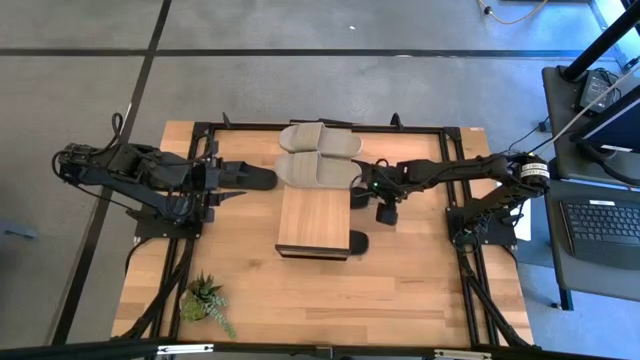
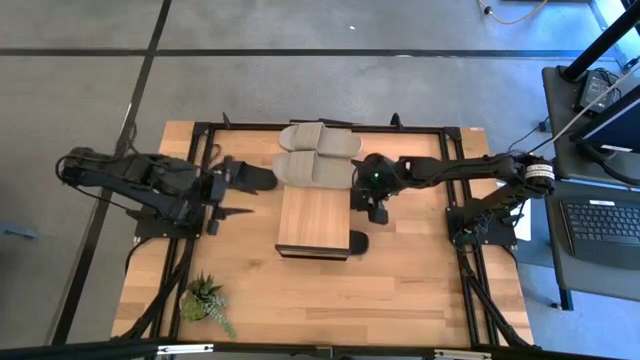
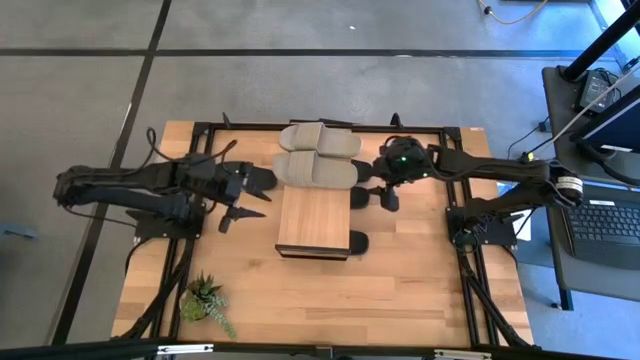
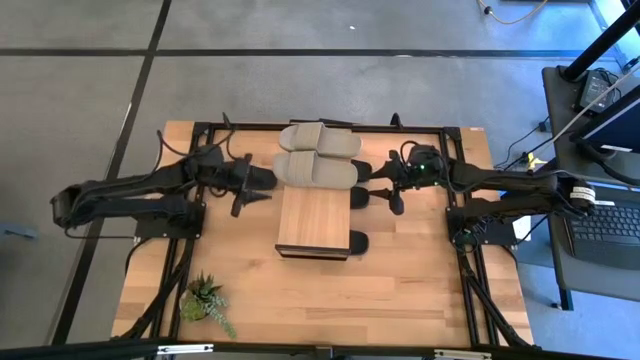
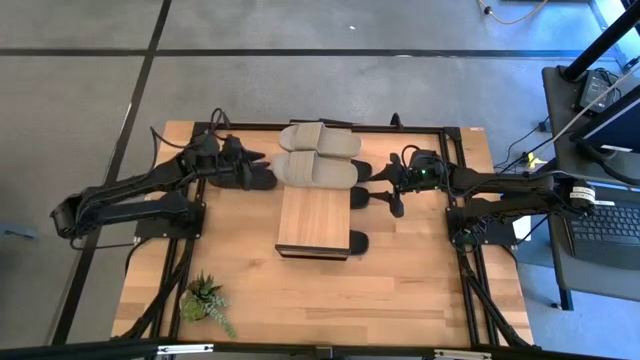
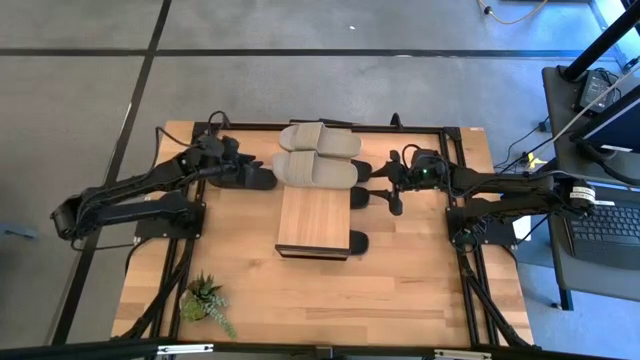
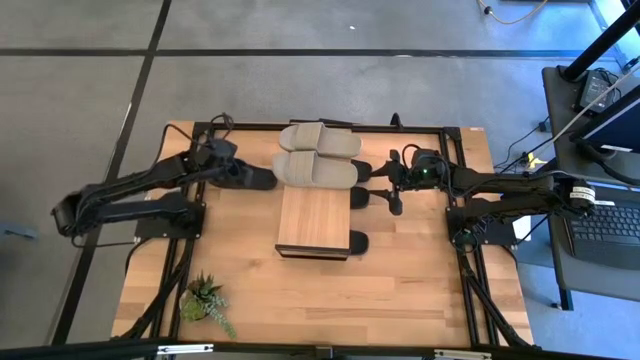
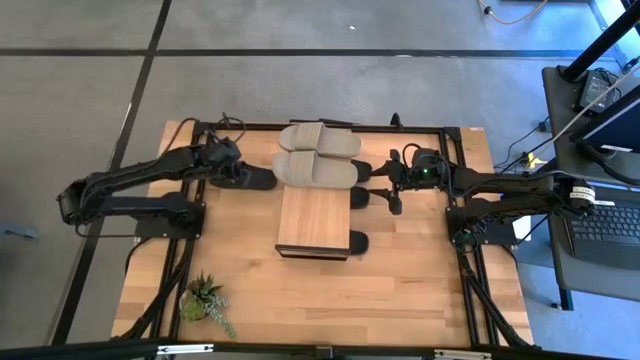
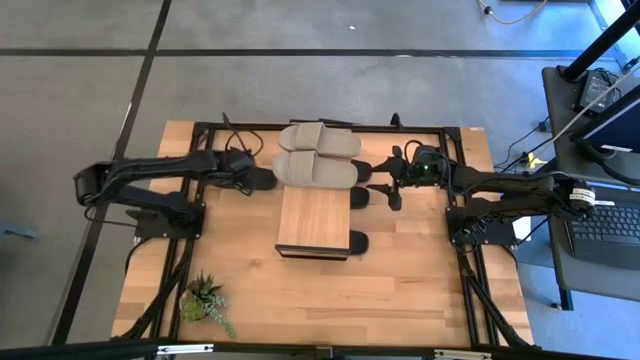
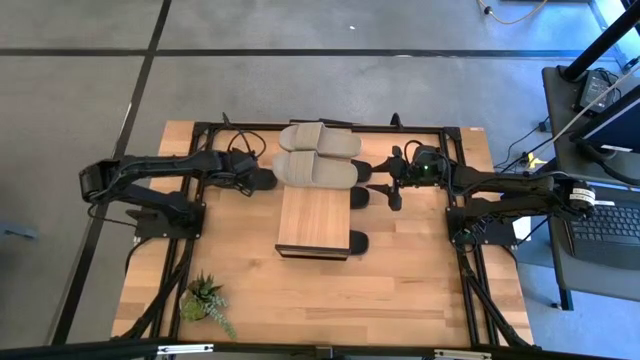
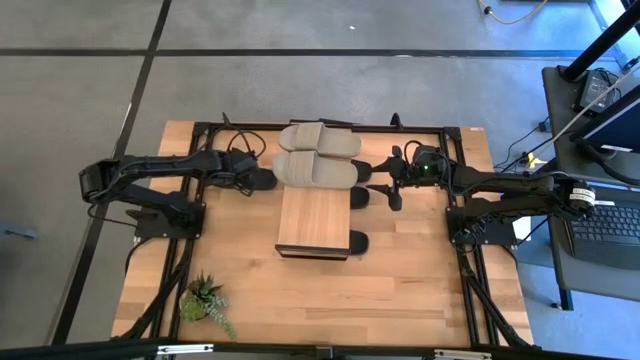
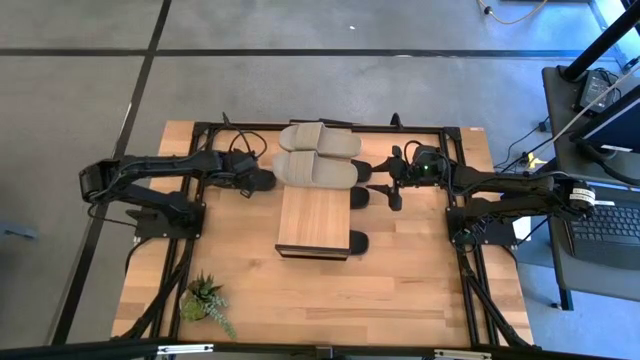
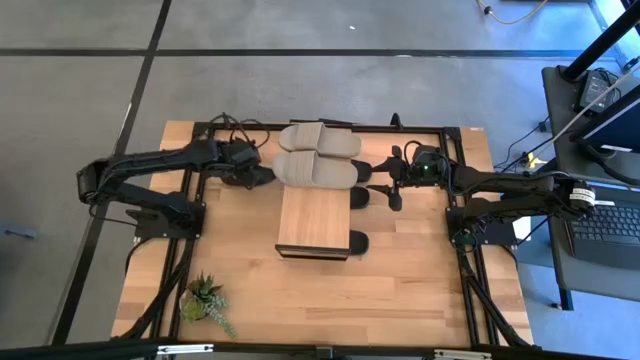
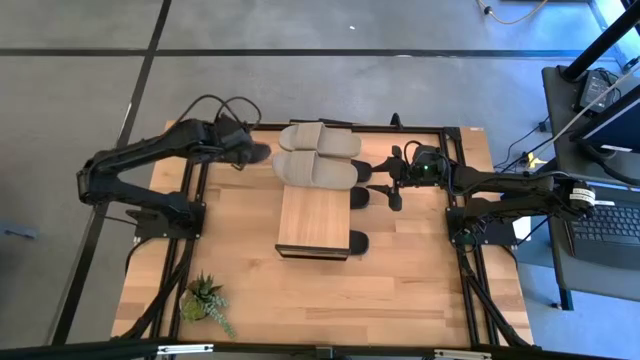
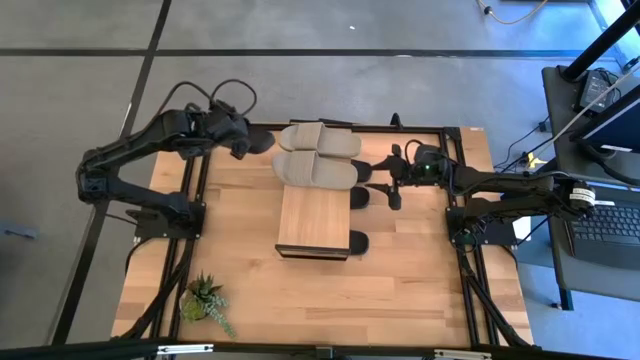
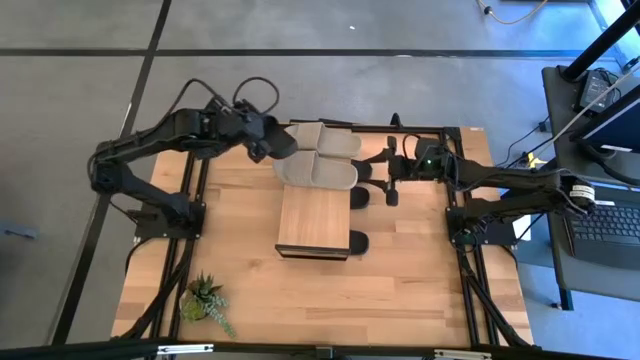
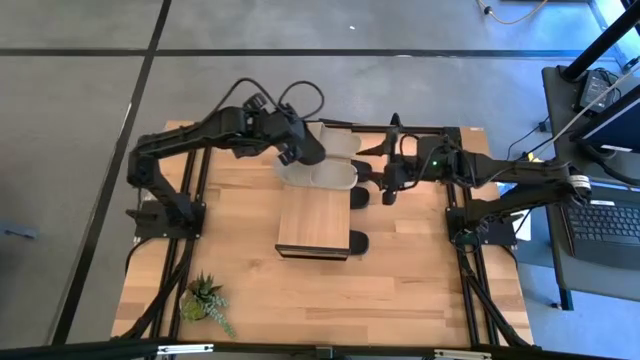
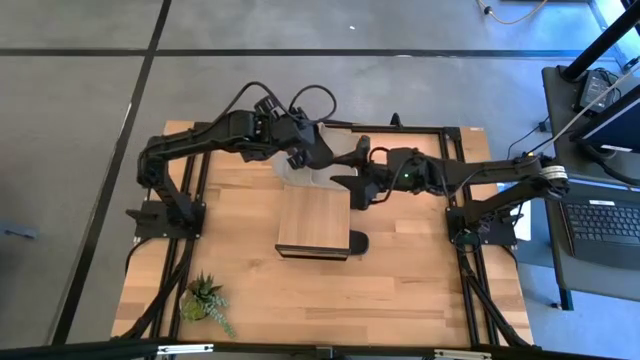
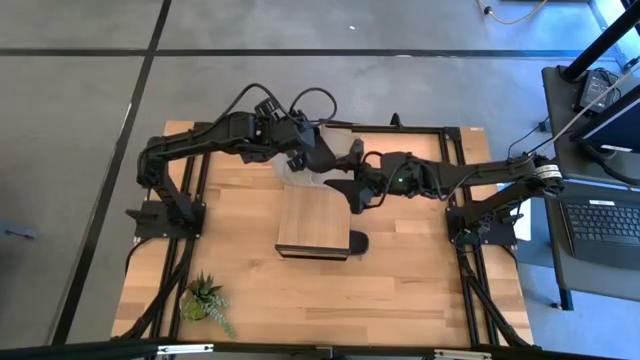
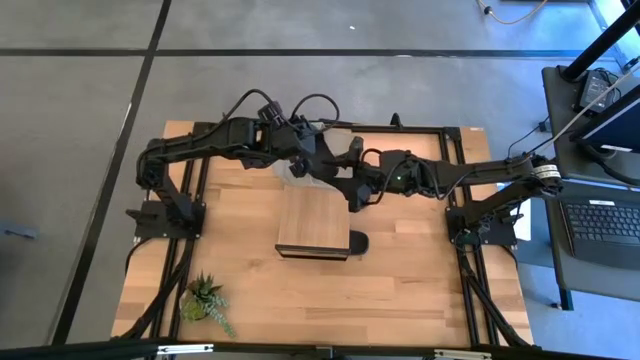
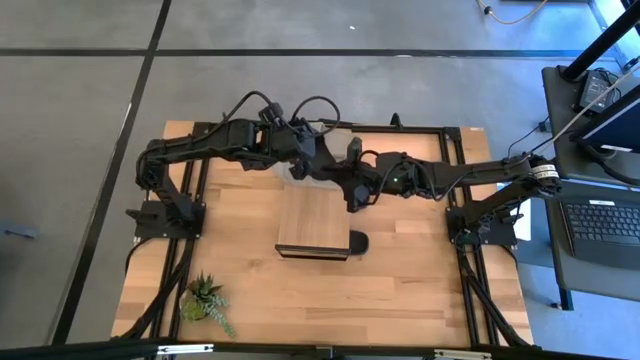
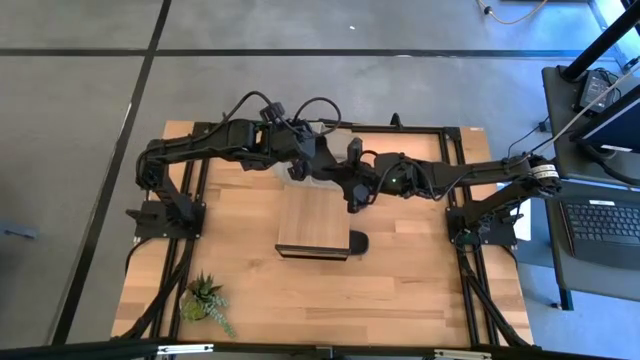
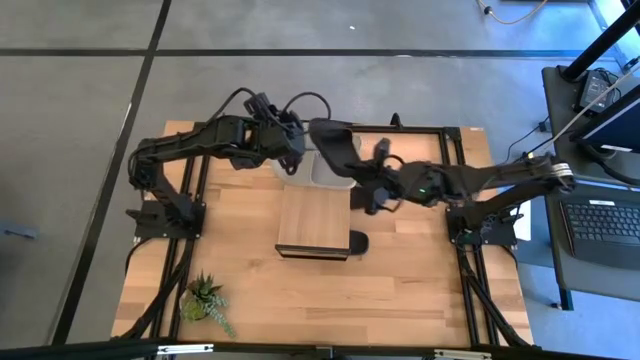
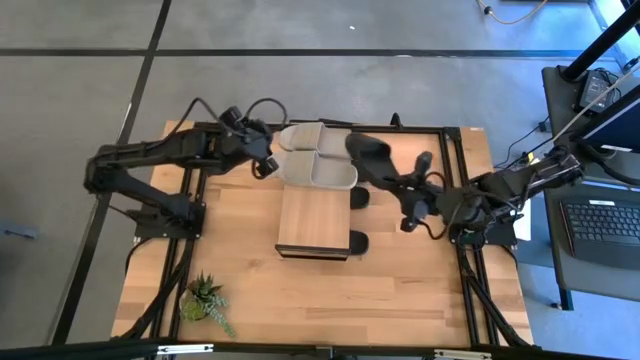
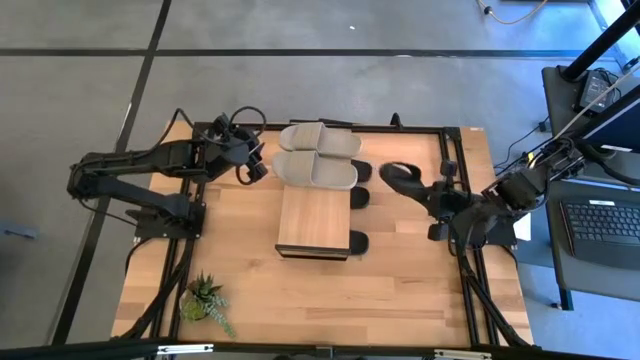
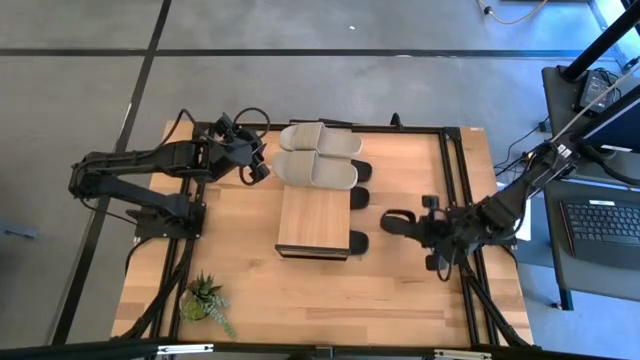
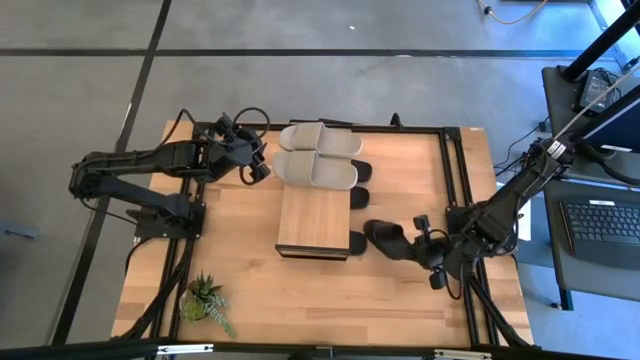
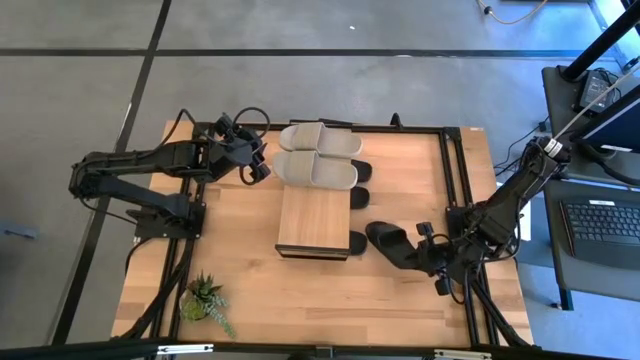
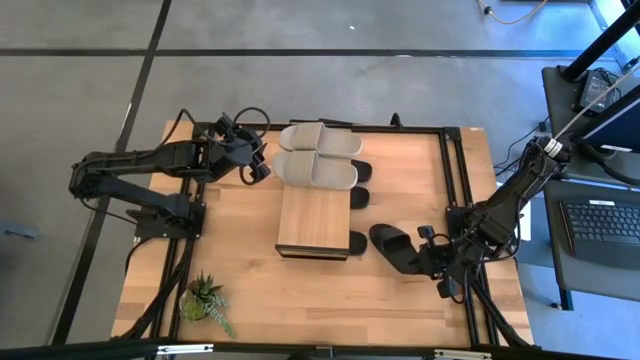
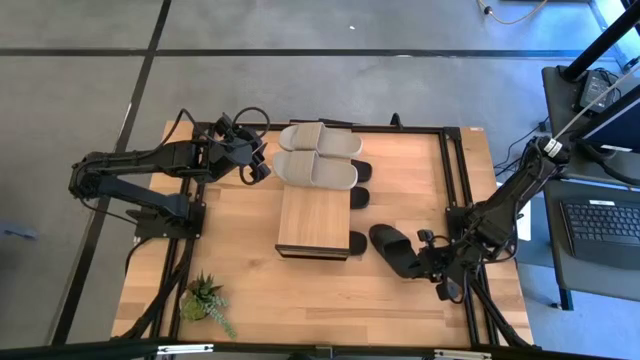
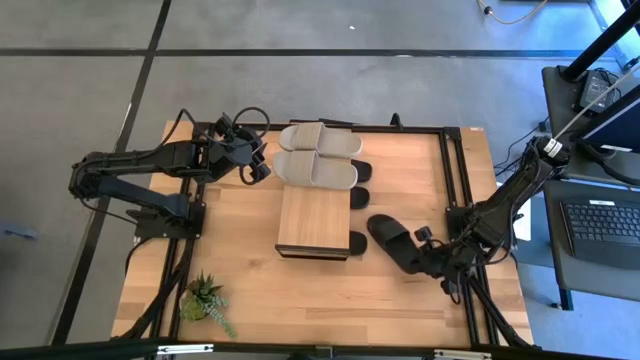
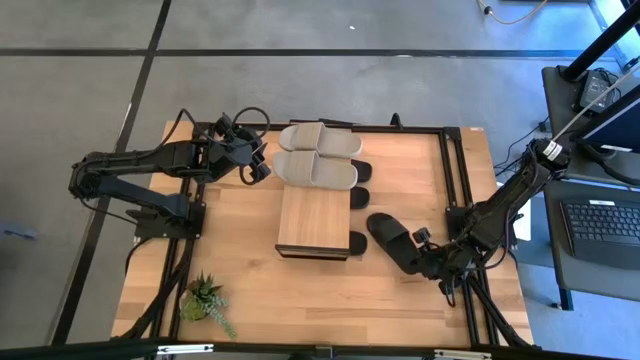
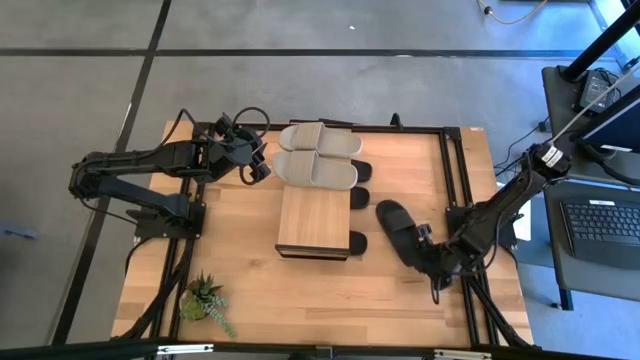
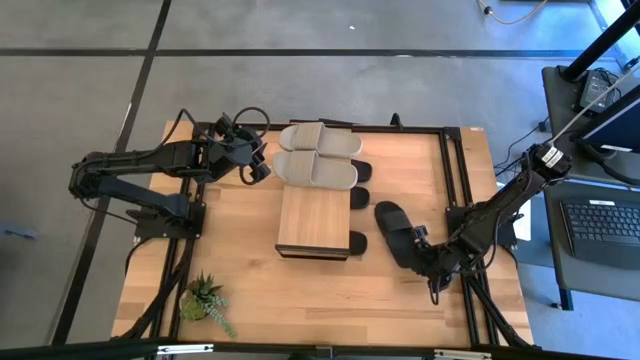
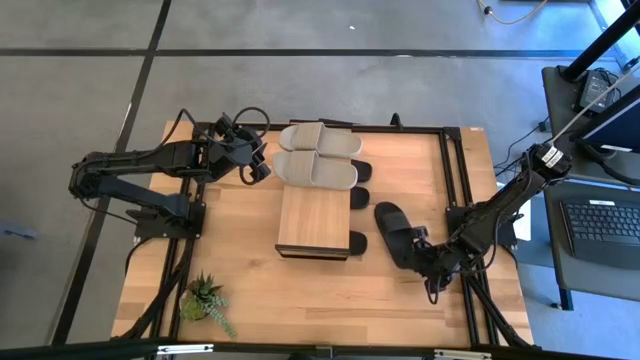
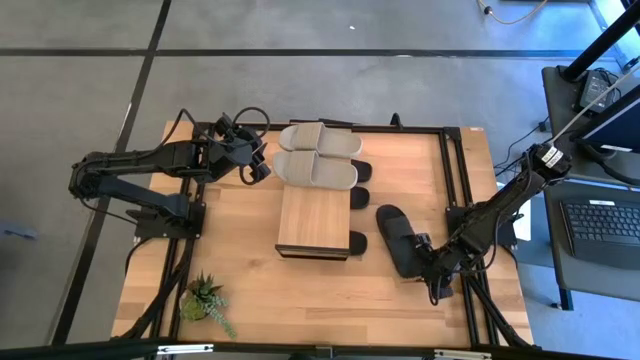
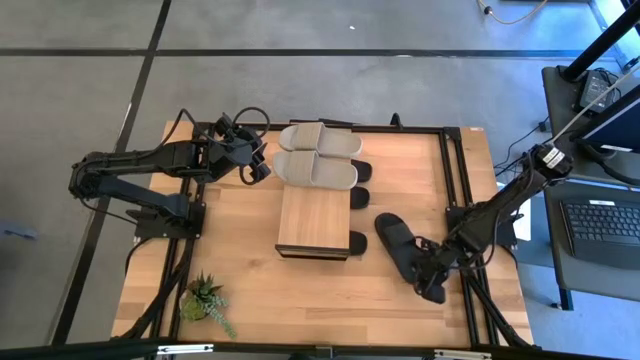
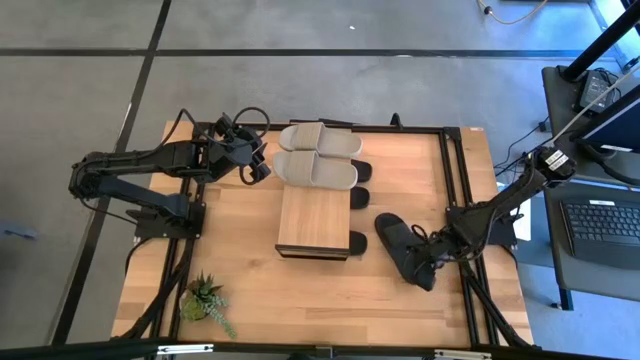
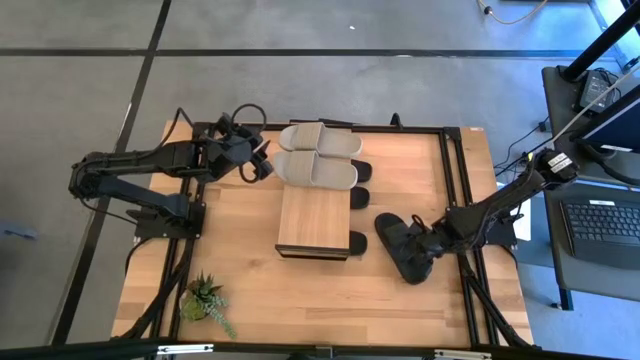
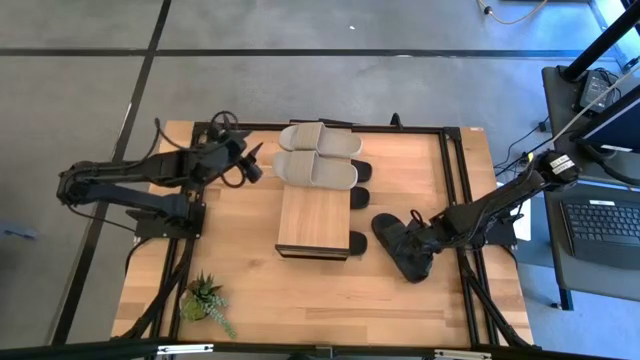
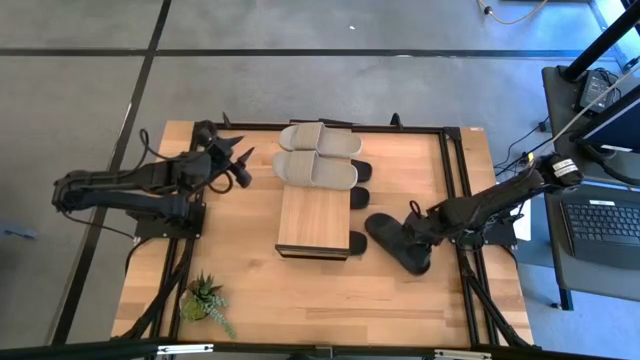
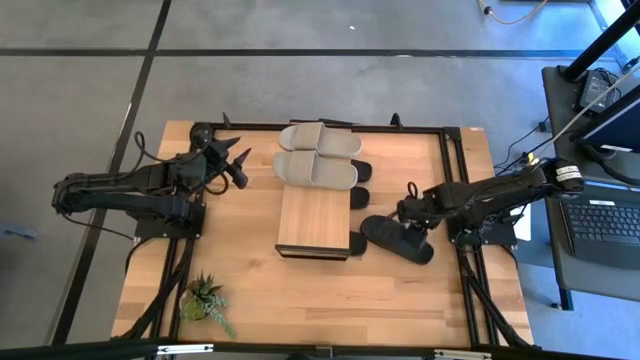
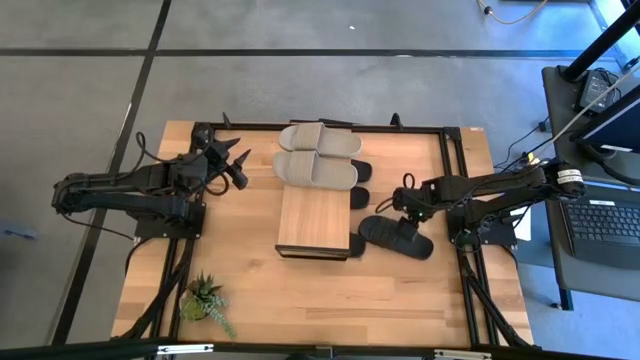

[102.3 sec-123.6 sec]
Task: Pick and place slides into the shelf
Put the black slide under the shelf
